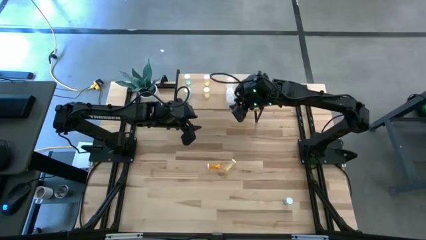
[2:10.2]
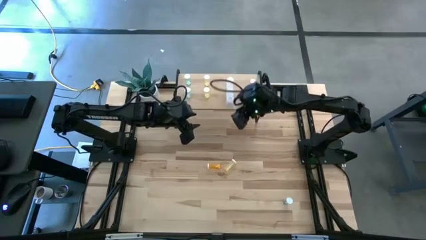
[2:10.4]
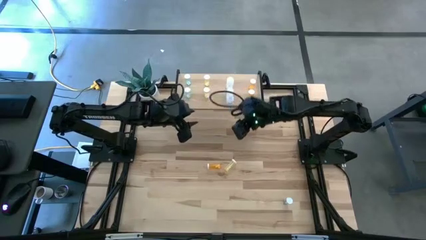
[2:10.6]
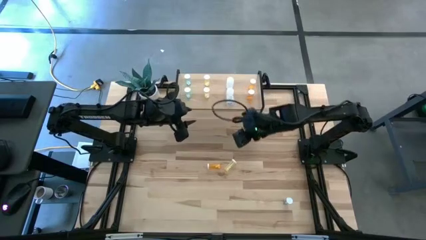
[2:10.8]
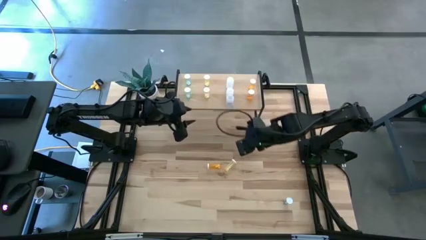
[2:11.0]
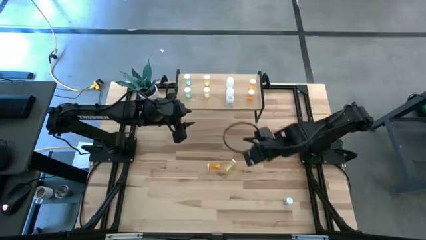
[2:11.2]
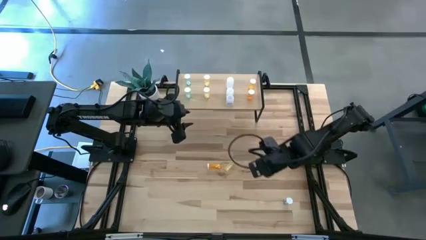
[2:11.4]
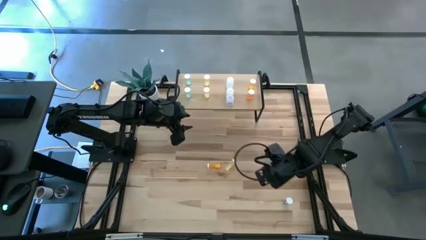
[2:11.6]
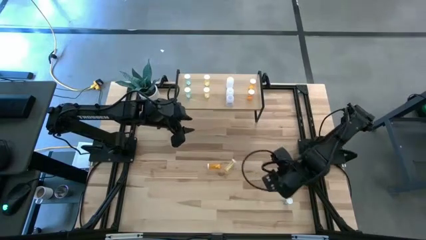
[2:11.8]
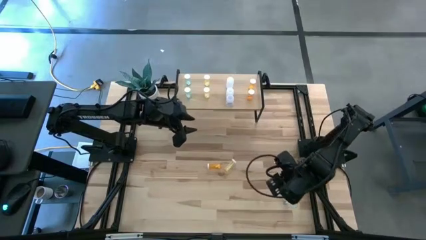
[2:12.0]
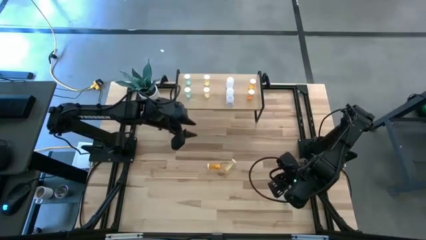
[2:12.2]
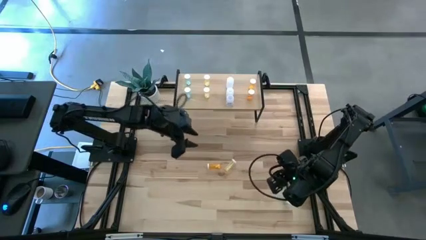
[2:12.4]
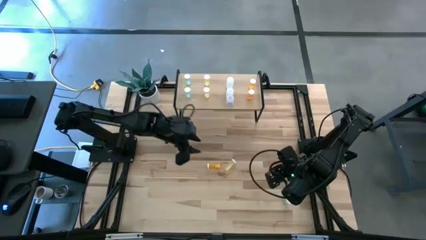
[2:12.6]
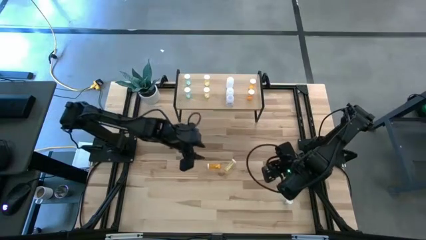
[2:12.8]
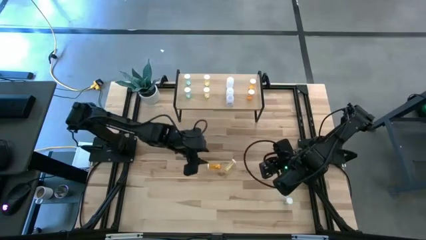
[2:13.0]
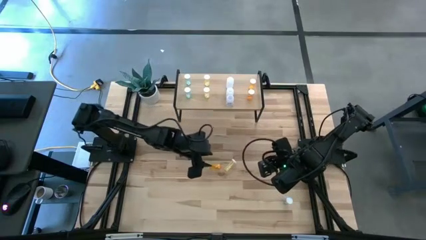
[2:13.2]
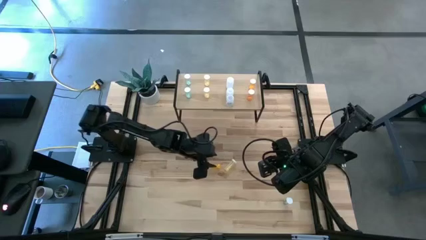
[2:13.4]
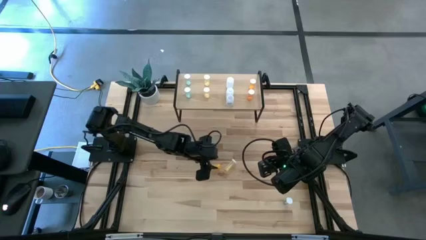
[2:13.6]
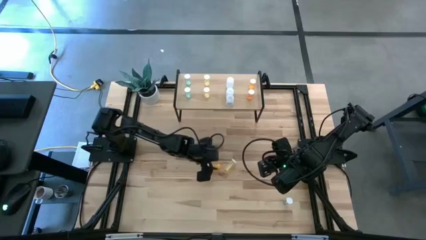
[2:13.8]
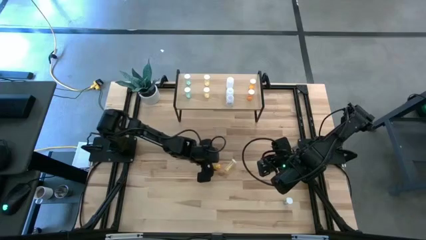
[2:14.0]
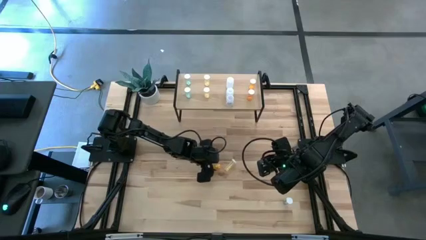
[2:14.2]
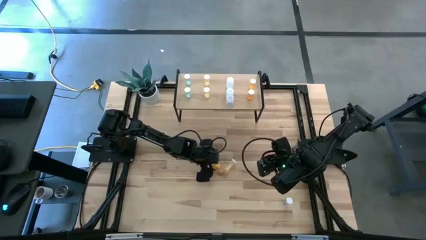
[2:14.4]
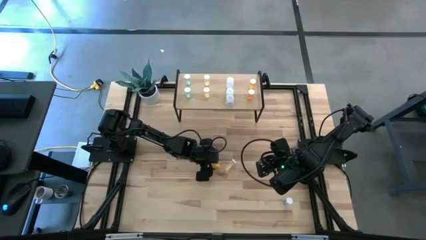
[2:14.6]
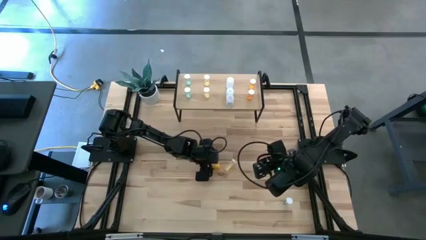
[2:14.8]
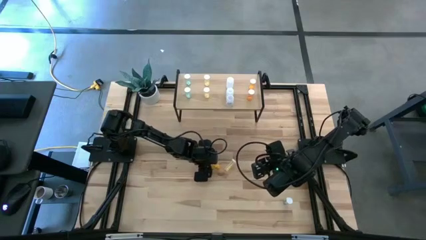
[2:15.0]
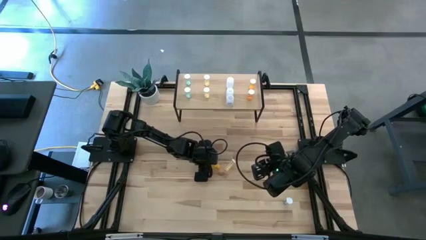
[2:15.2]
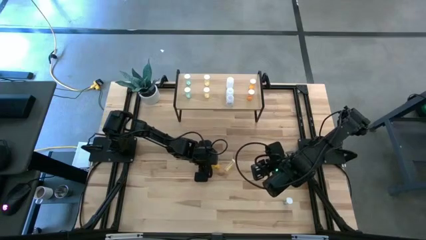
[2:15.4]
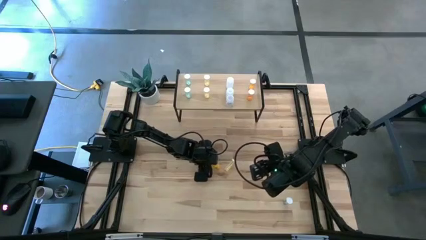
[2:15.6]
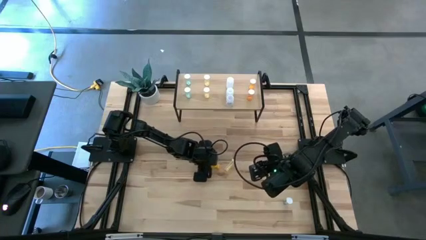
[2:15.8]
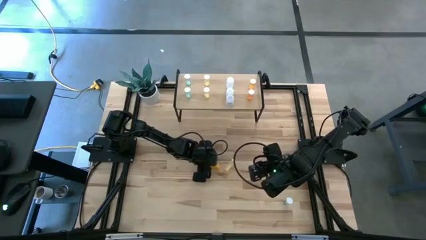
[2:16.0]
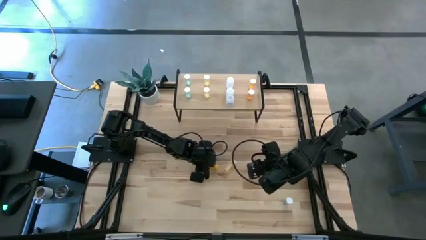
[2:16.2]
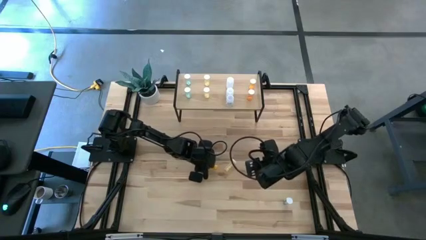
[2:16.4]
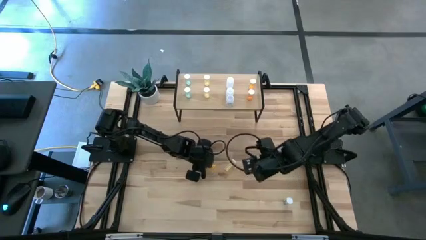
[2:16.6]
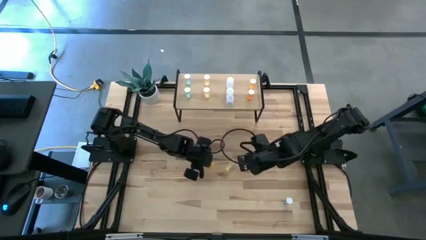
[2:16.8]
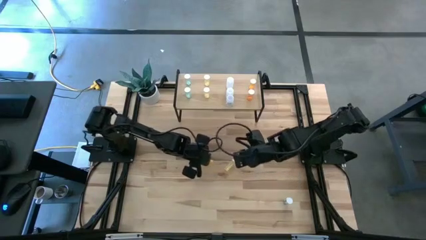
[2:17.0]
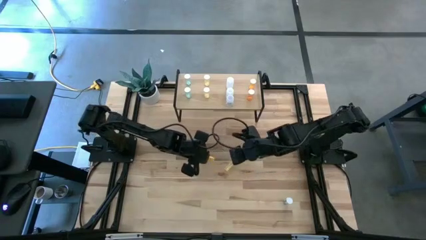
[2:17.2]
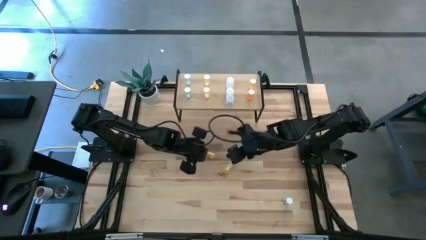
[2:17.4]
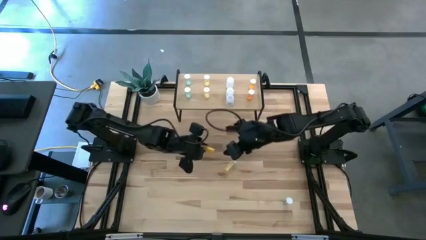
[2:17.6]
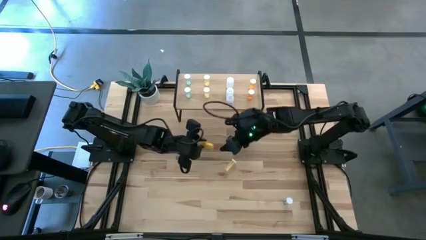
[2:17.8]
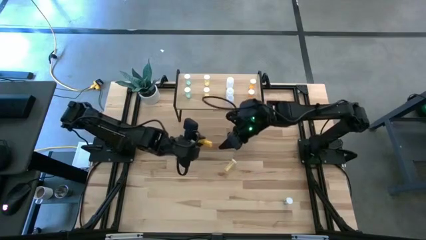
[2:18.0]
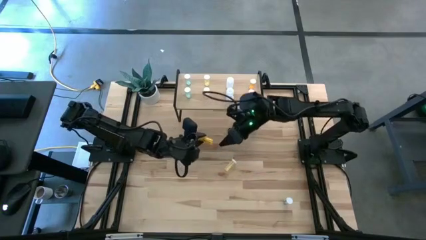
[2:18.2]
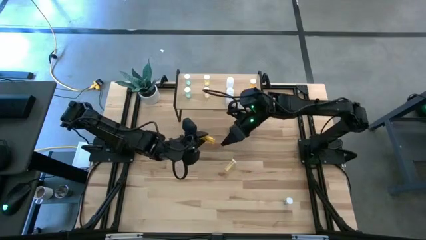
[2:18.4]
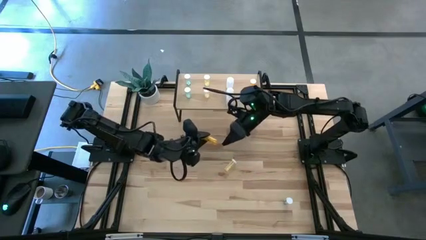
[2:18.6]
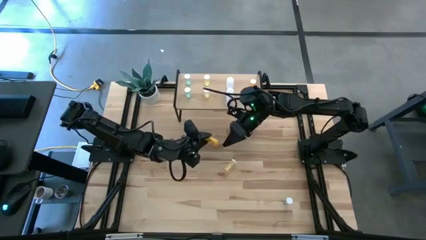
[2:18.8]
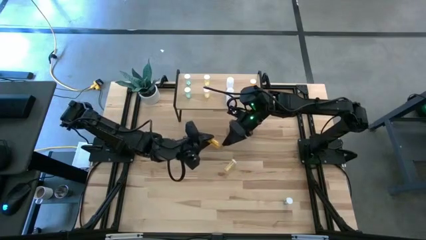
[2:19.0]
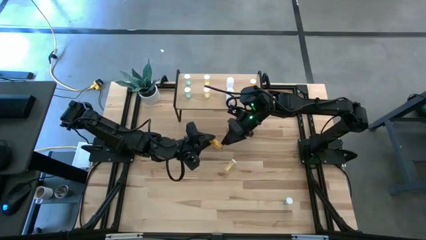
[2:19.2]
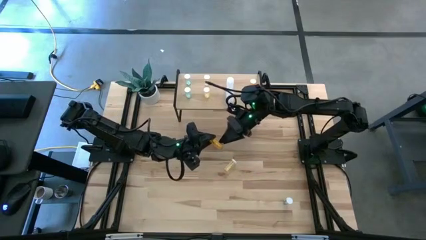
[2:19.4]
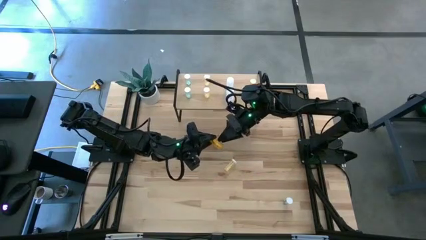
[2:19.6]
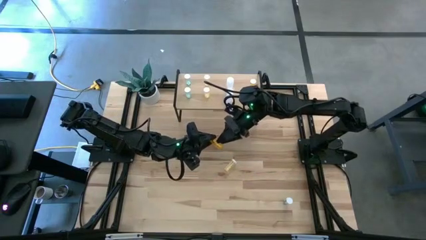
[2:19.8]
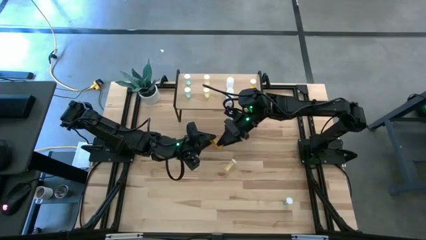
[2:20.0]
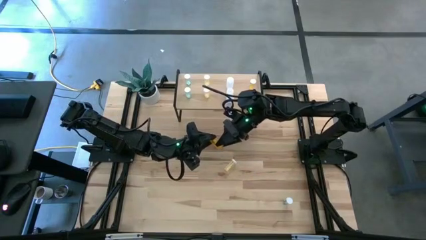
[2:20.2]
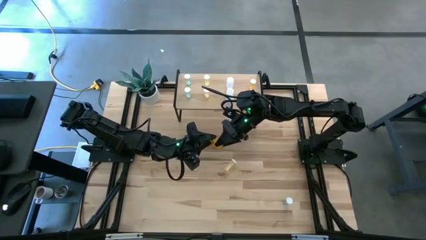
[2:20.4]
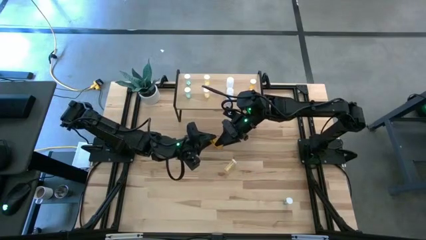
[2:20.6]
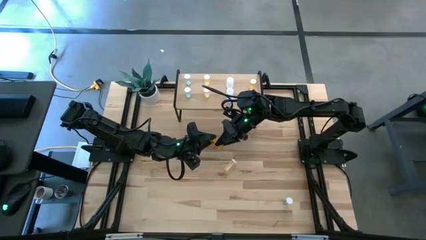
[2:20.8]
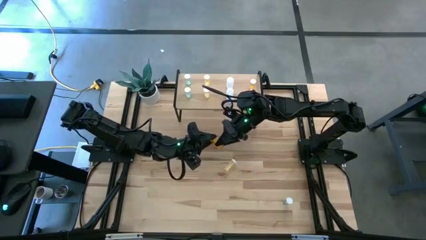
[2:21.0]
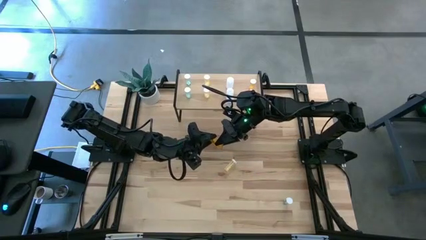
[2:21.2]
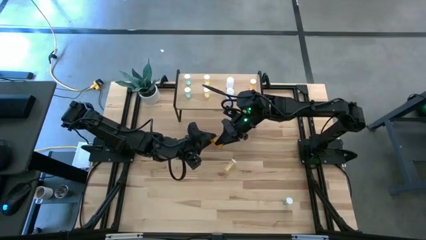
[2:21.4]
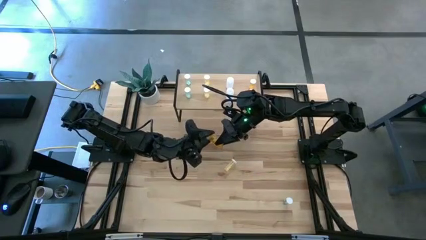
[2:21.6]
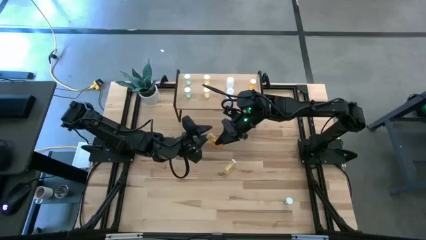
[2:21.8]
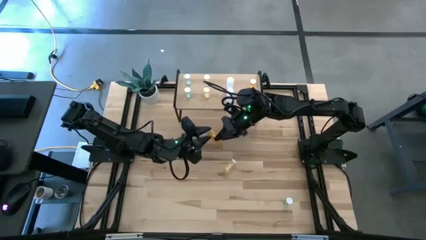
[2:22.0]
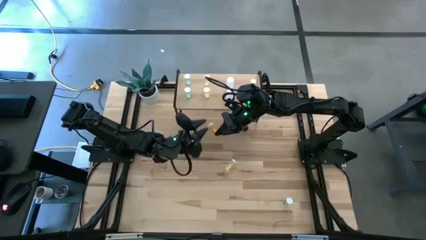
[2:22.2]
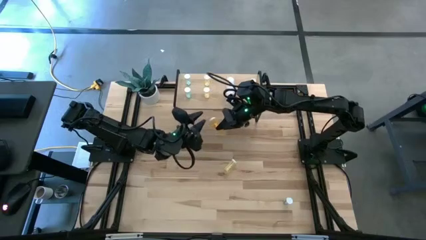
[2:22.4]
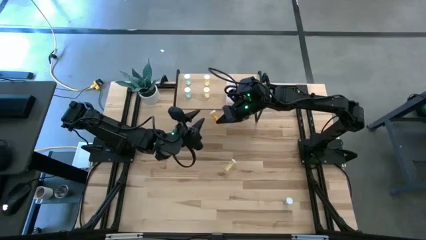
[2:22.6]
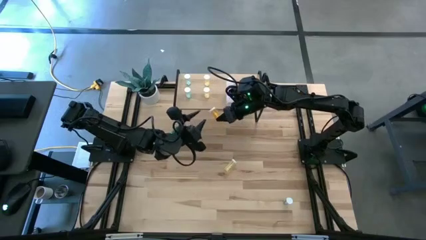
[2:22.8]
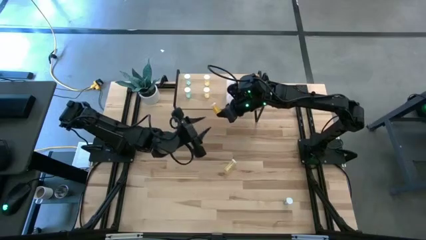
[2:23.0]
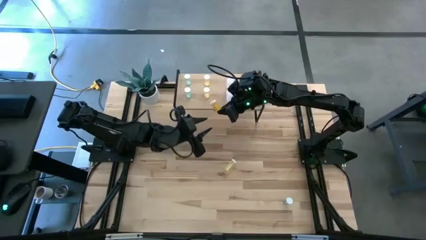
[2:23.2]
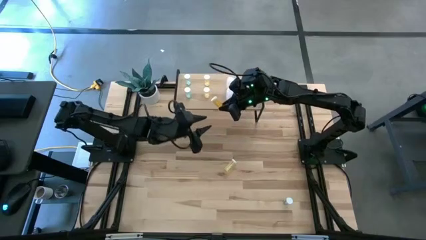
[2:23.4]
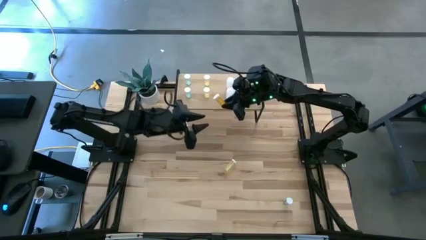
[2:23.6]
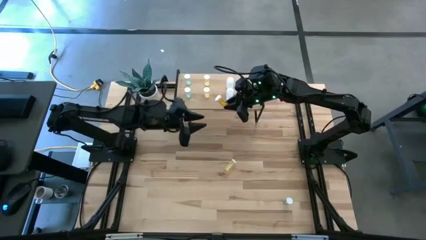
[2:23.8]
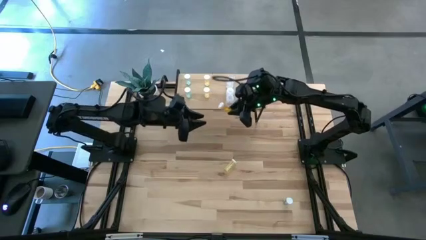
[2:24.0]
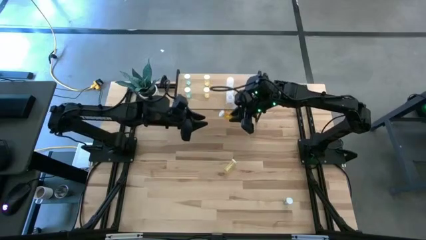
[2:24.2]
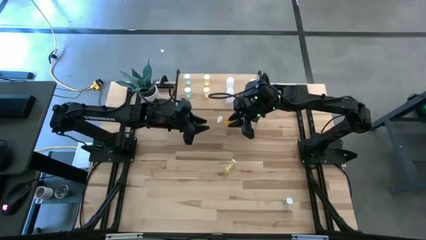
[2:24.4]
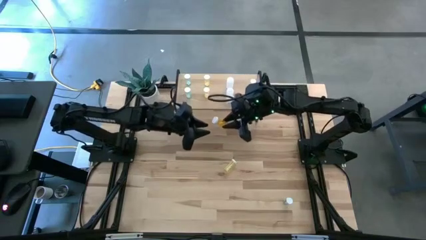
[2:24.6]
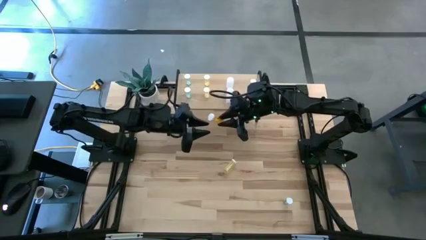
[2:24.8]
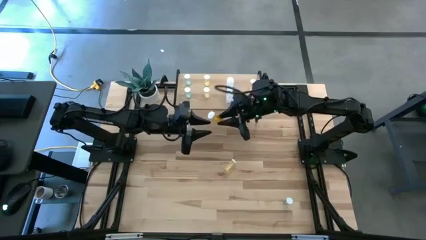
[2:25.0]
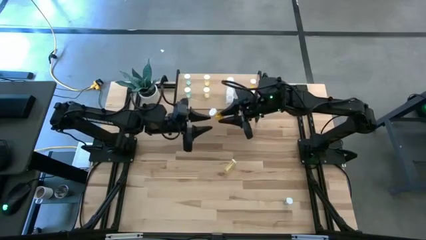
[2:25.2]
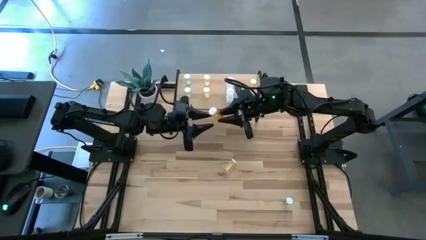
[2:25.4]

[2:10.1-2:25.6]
Task: Pick and place medicine bottles onto shelf by color
Put the orange pill bottle aligned with the other orange pill bottle on the shelf
